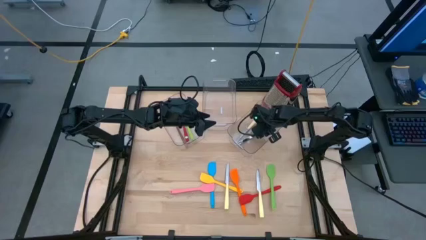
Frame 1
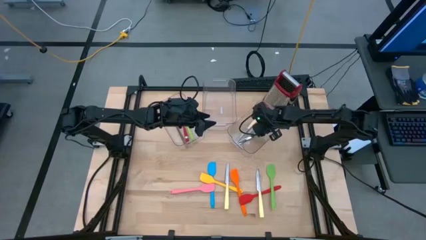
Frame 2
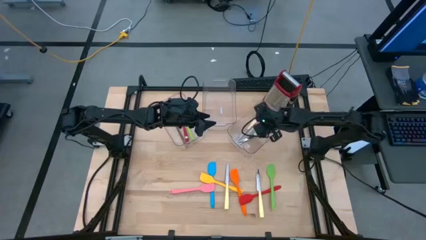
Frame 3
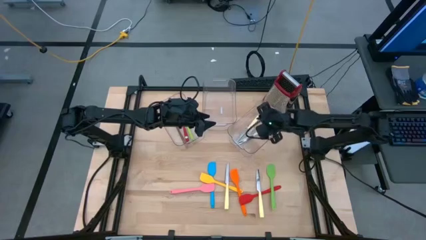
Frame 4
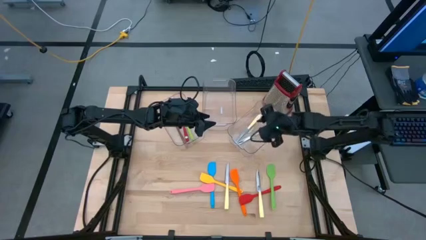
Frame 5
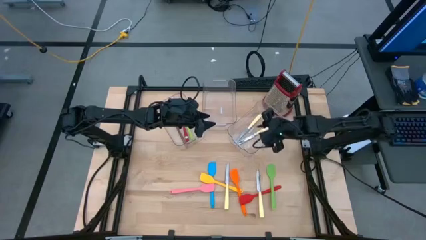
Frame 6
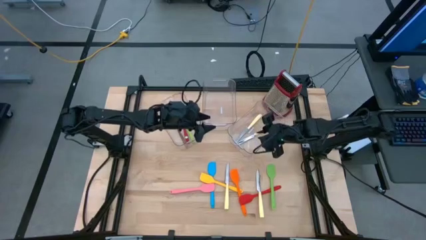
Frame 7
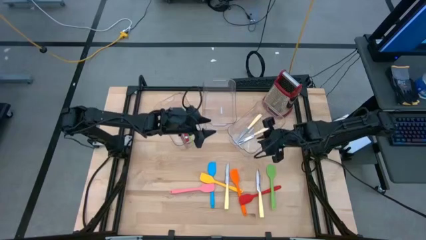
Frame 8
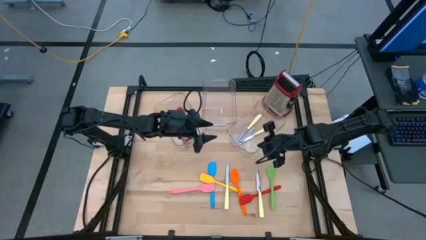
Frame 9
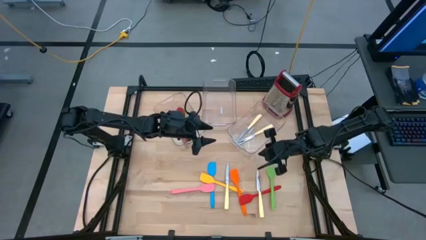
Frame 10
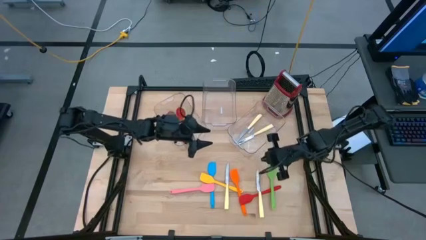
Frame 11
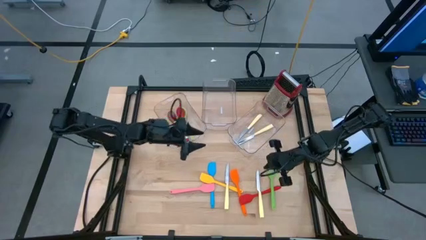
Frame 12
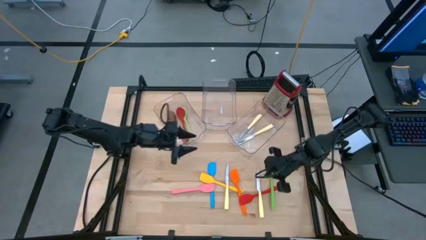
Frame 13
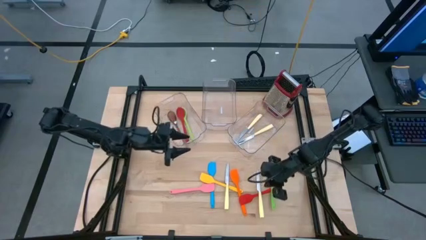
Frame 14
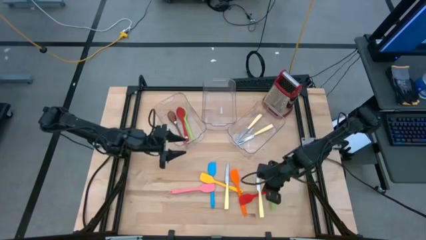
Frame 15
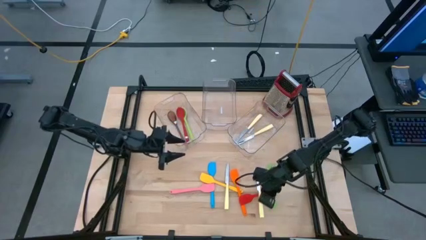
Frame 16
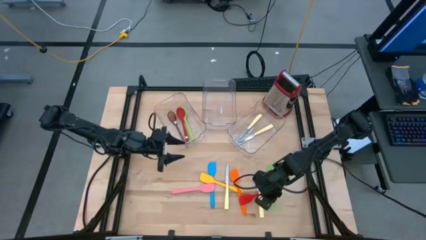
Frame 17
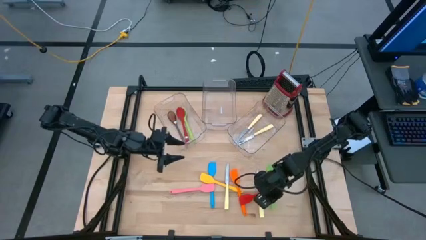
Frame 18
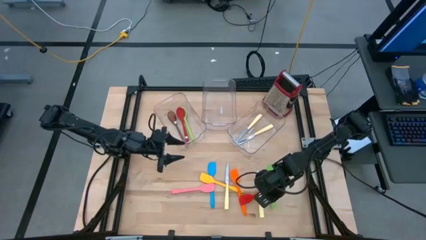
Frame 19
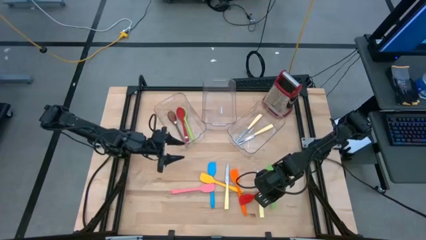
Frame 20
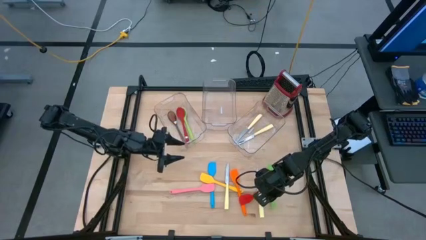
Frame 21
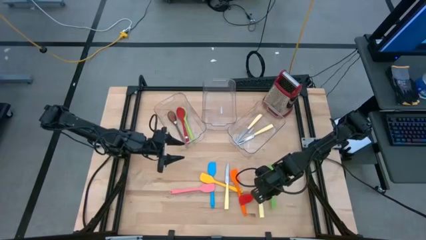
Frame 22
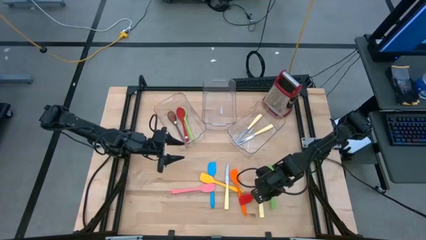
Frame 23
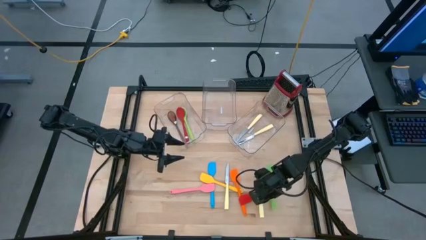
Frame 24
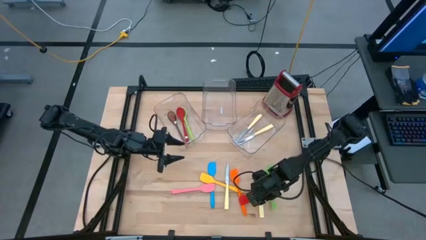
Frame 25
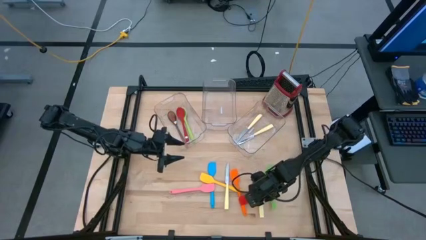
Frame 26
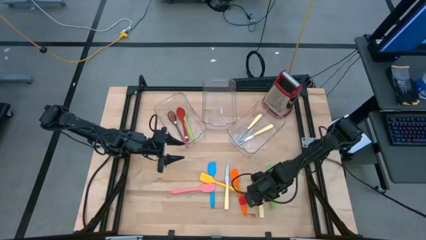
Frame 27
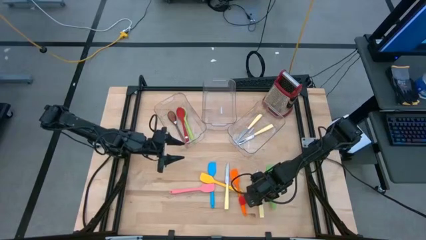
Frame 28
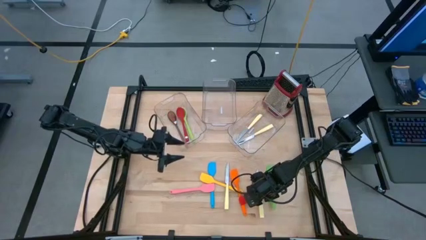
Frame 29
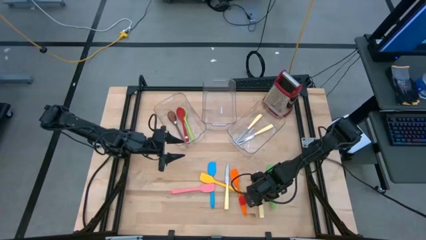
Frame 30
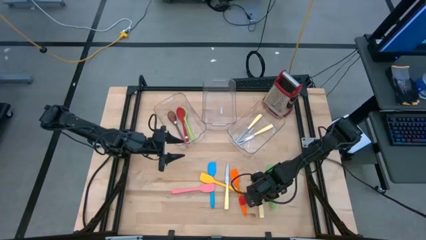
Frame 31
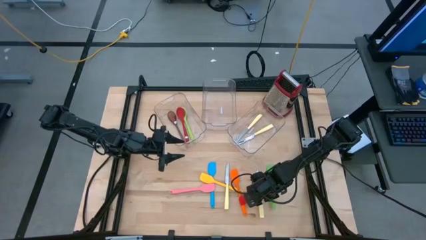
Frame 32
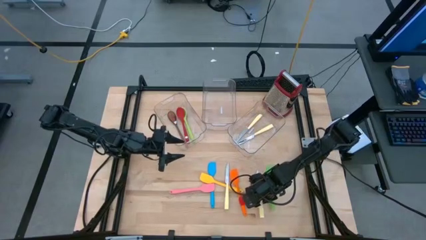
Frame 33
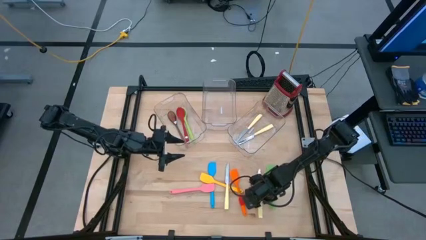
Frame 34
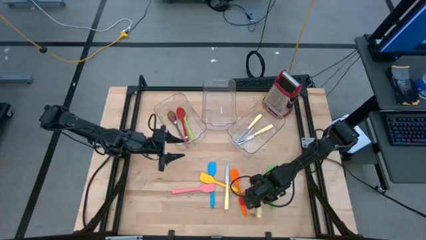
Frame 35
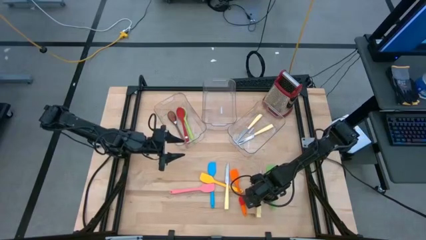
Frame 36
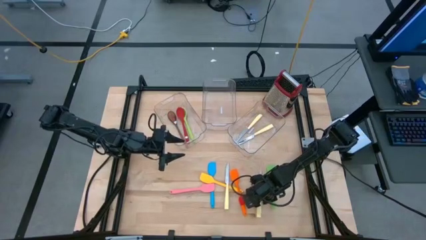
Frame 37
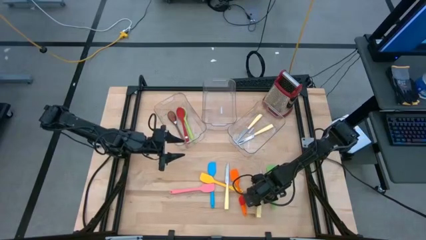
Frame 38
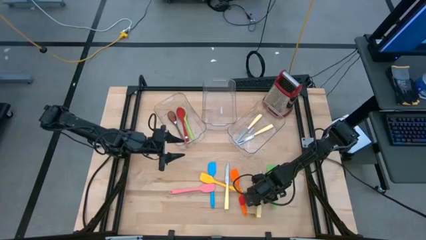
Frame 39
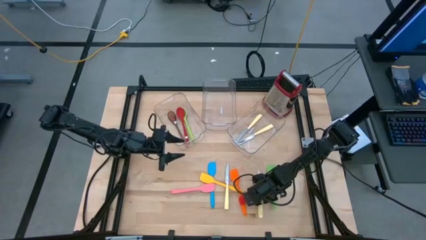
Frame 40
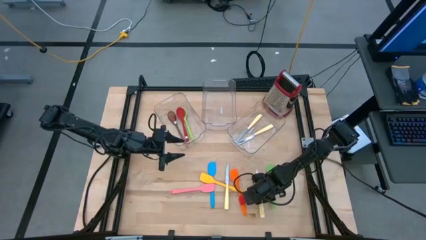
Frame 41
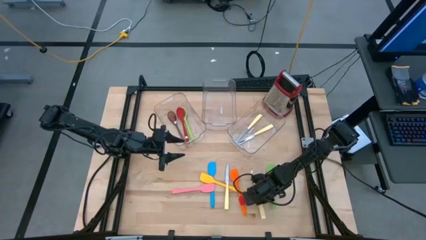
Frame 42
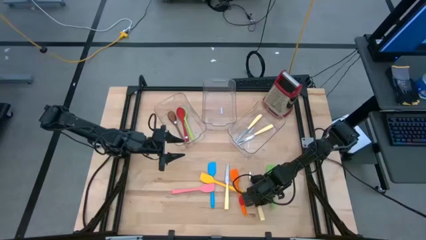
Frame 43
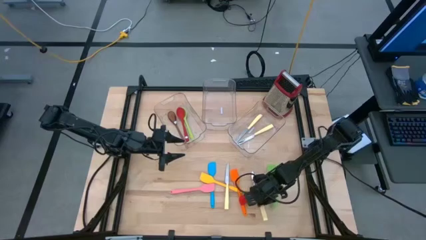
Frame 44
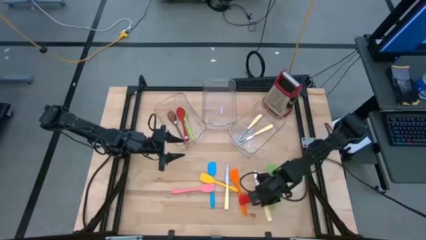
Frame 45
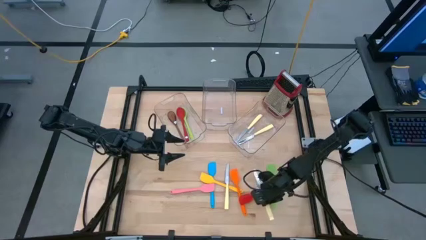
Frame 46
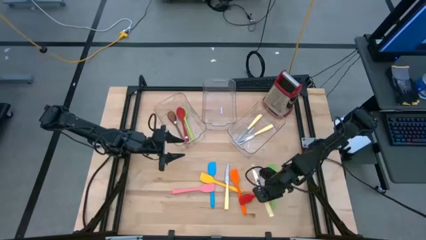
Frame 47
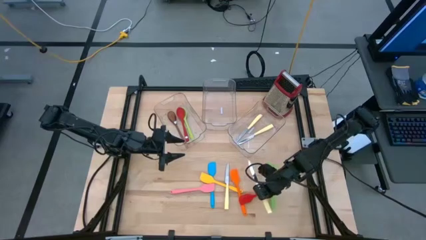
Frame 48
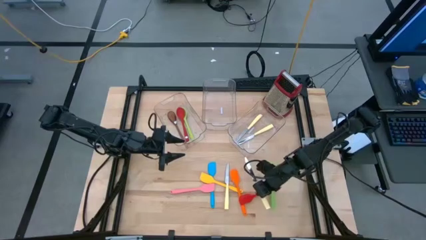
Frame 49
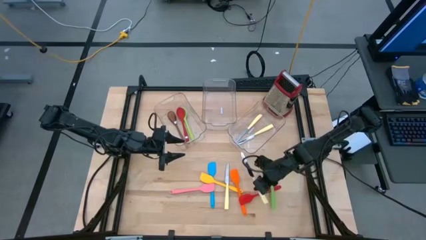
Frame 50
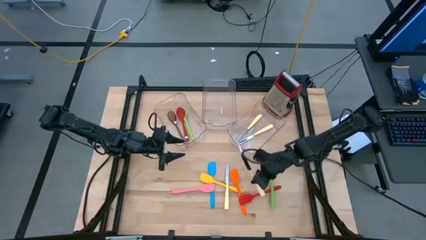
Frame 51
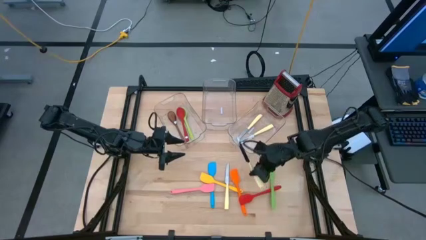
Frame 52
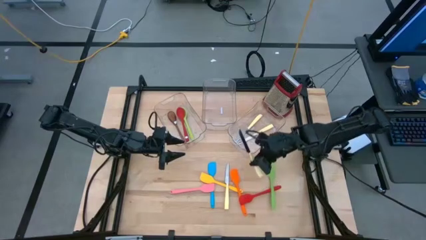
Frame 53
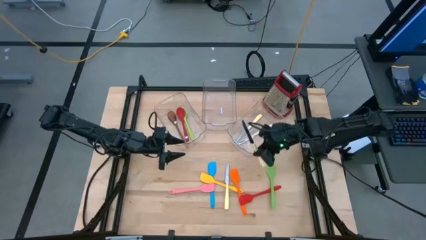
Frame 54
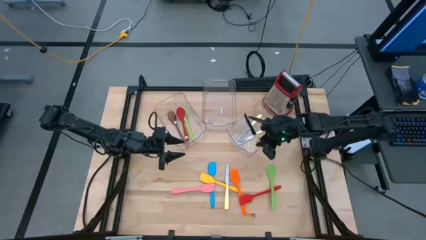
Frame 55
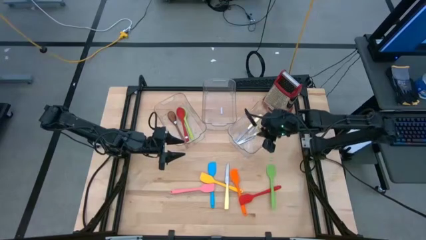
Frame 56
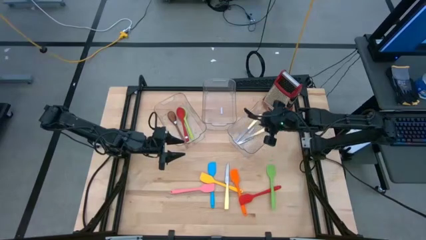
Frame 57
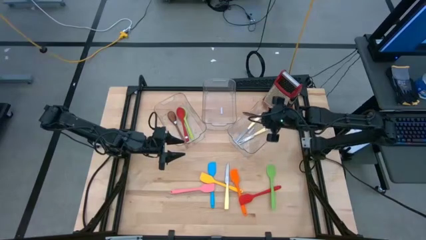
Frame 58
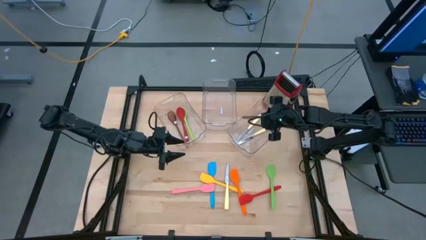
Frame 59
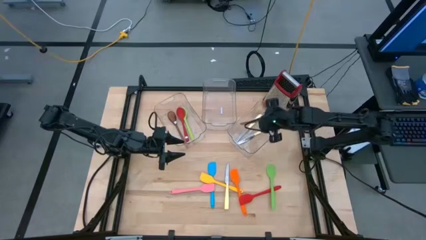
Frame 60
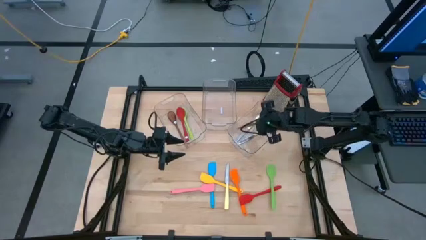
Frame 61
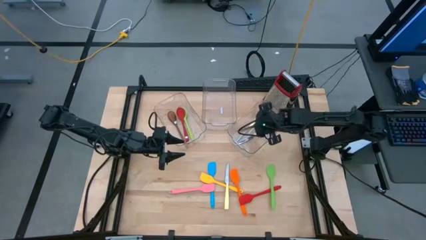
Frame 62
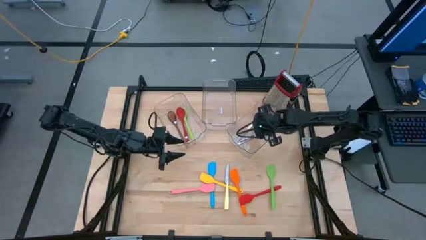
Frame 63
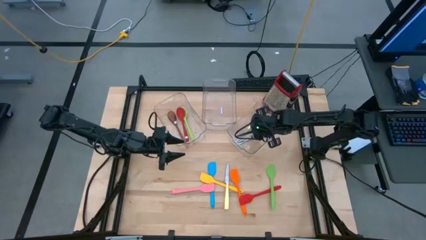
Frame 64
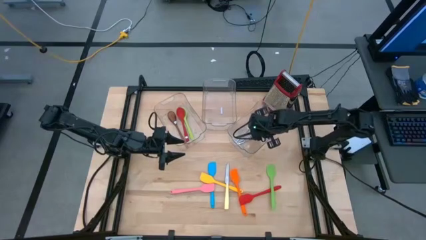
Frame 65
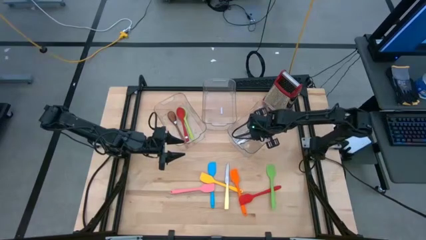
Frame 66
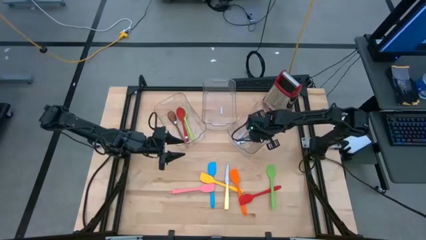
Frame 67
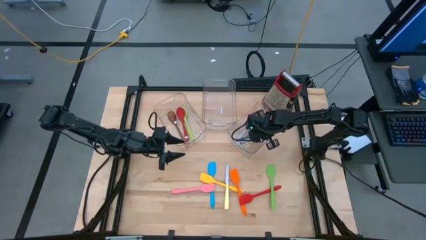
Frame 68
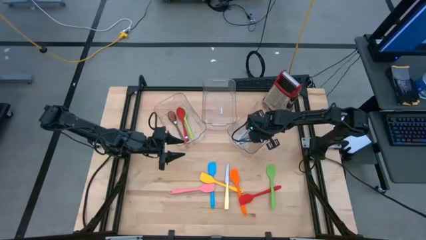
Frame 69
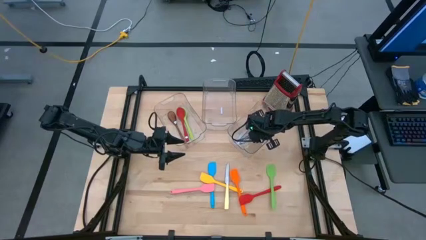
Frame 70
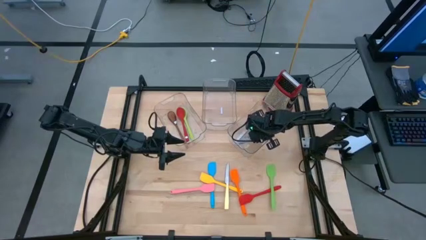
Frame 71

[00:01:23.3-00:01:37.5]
Task: Pick & Place Kitchen Items
Put the yellow table knife into the right transparent bin

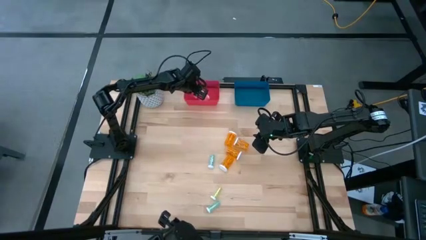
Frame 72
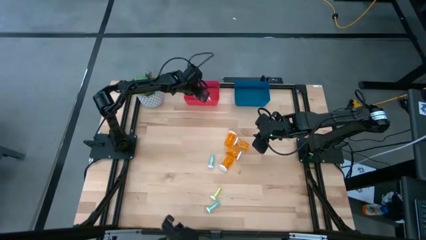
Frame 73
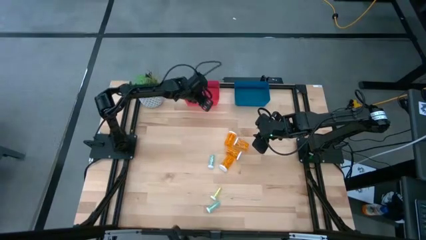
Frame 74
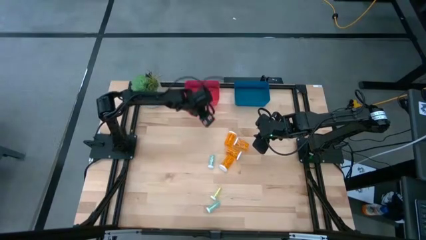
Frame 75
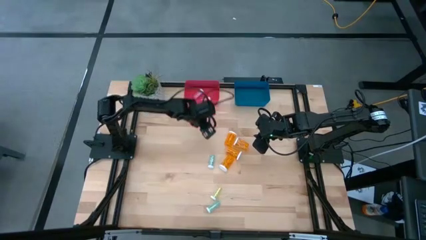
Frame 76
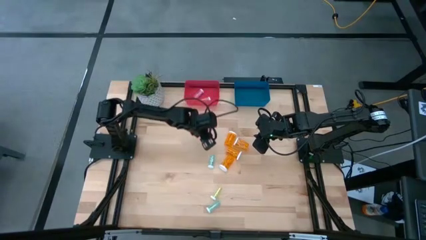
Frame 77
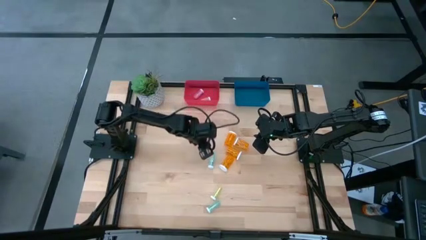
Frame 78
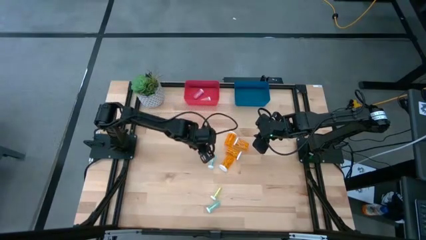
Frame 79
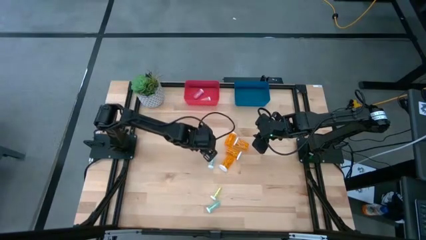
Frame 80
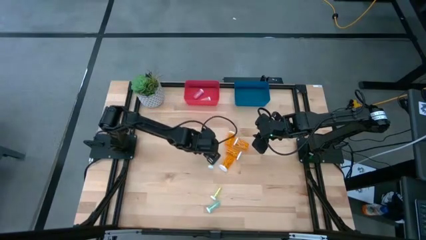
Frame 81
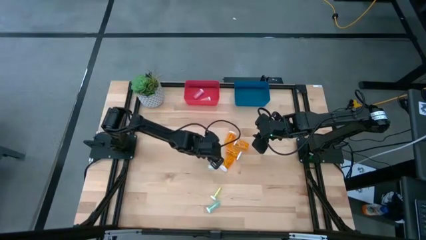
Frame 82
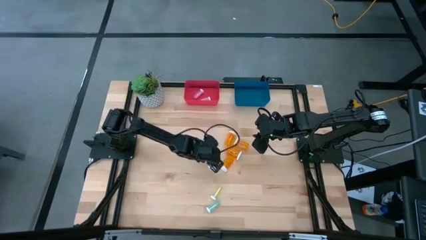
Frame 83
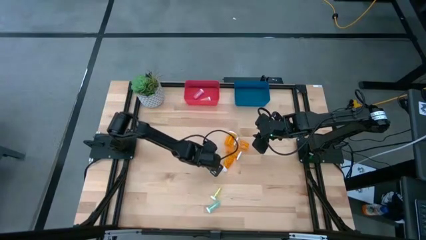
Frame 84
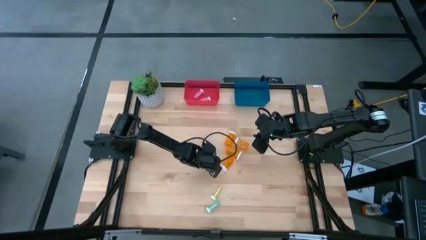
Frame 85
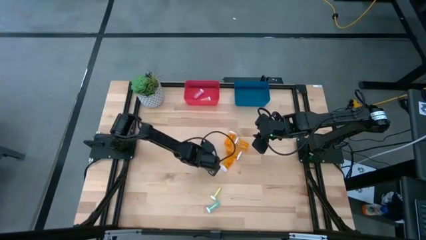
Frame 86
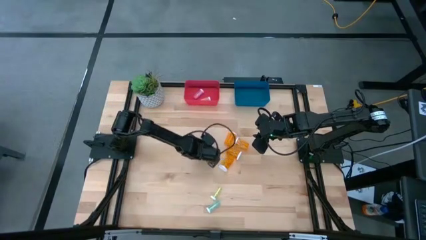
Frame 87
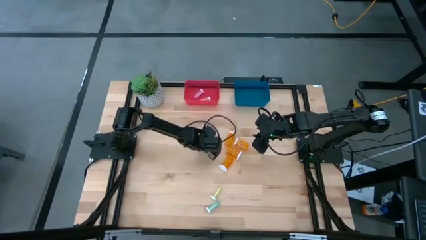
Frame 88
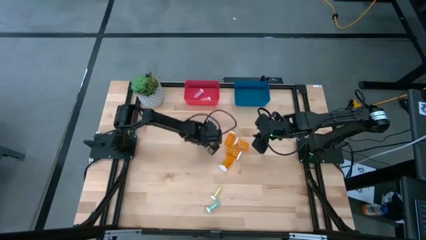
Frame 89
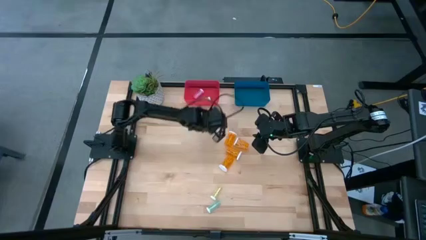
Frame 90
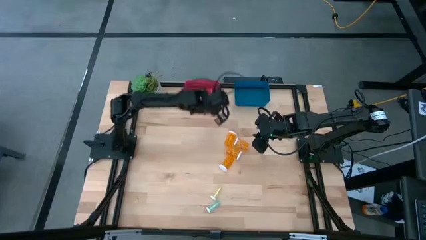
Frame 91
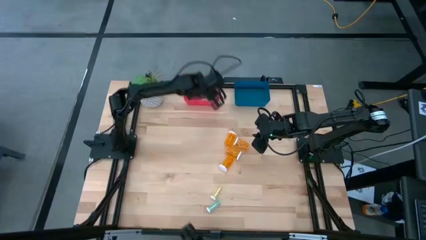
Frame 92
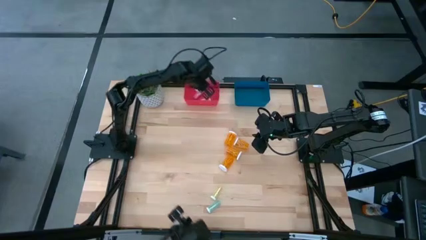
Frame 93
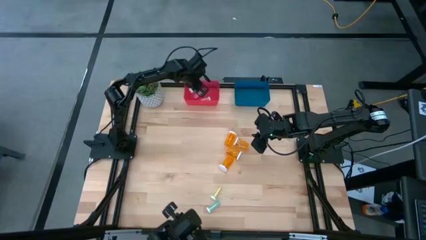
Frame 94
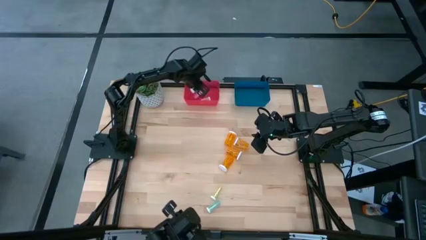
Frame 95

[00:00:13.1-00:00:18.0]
Task: Pick and place medicine bottles into bin by pill shape (circle, oval)
Put the blue pill bottle into the blue bin
